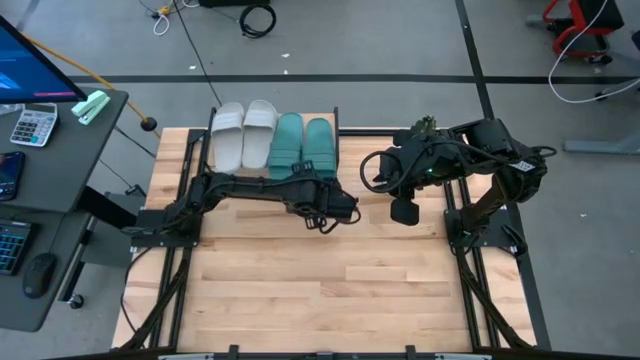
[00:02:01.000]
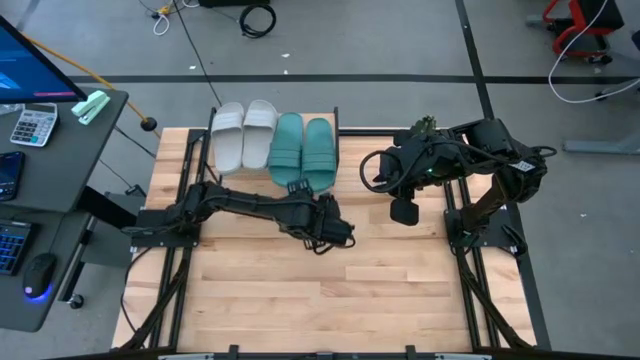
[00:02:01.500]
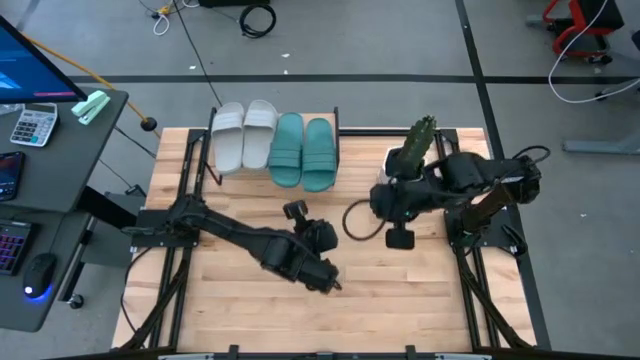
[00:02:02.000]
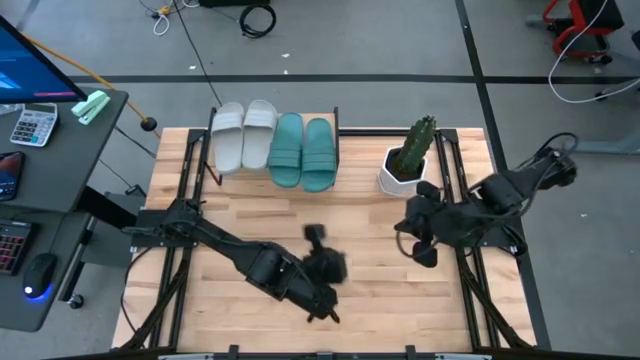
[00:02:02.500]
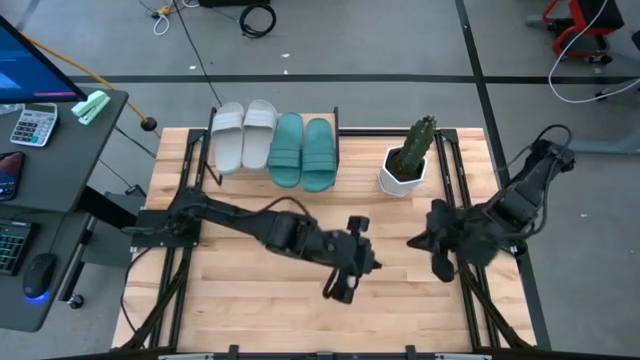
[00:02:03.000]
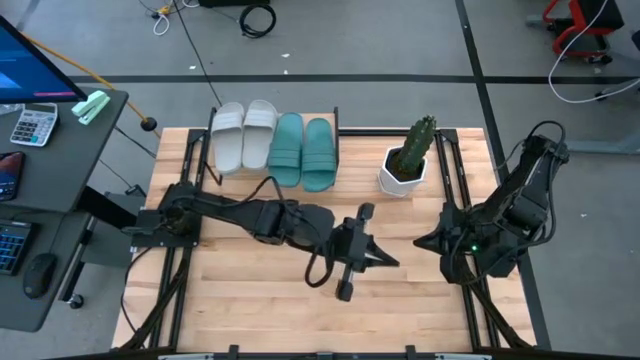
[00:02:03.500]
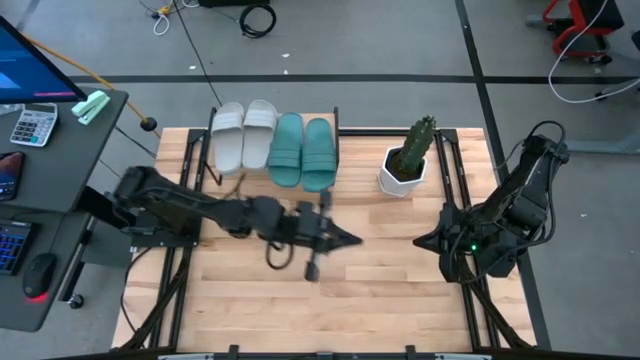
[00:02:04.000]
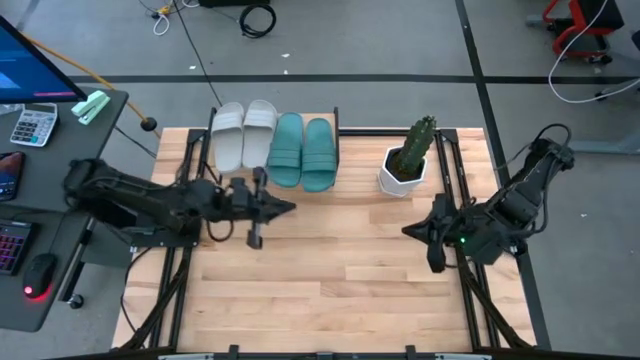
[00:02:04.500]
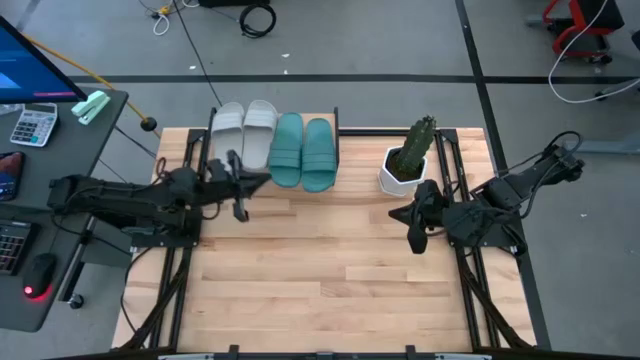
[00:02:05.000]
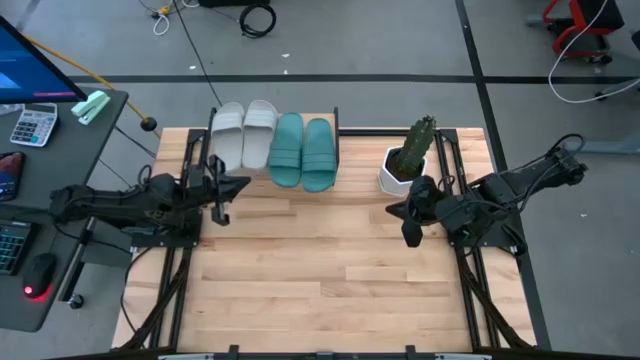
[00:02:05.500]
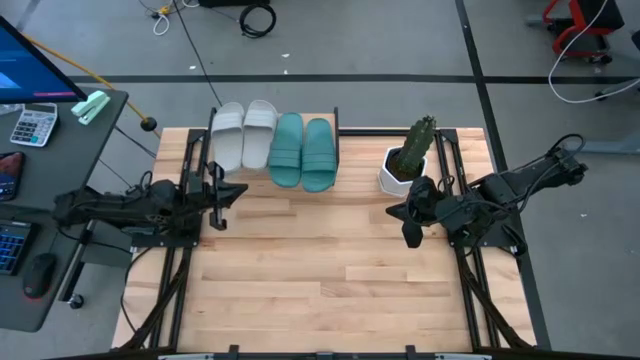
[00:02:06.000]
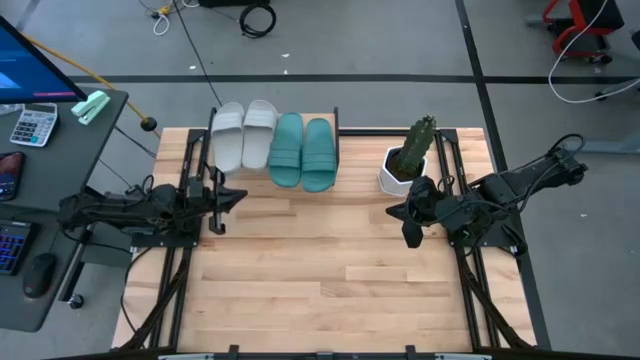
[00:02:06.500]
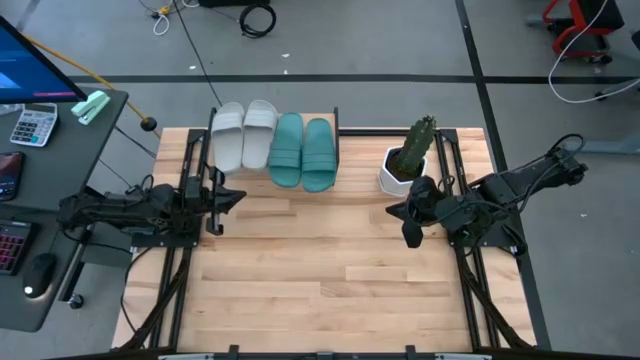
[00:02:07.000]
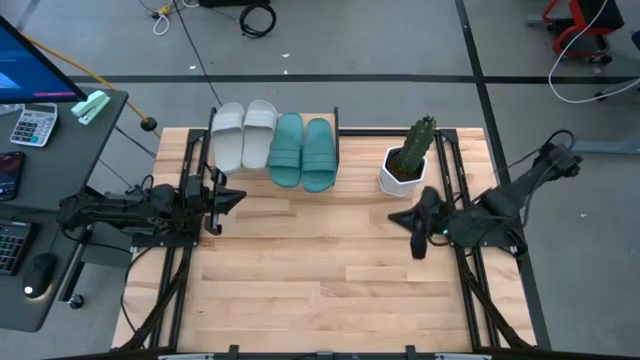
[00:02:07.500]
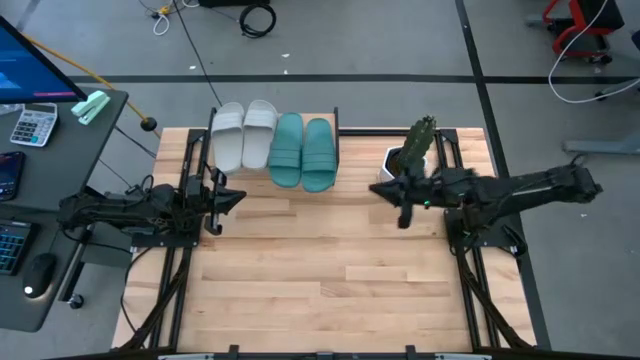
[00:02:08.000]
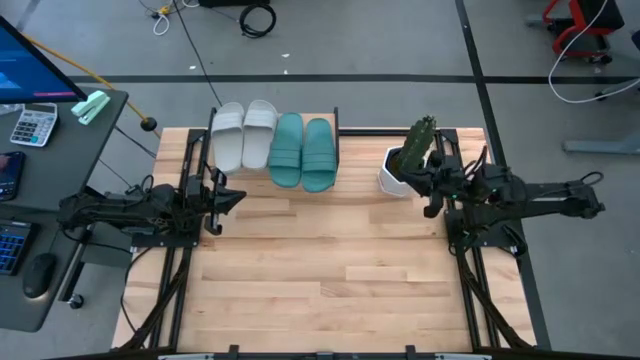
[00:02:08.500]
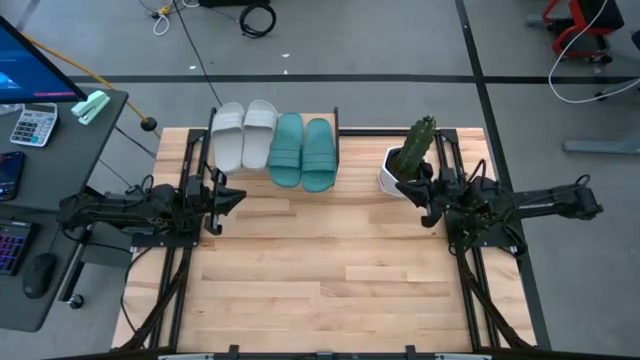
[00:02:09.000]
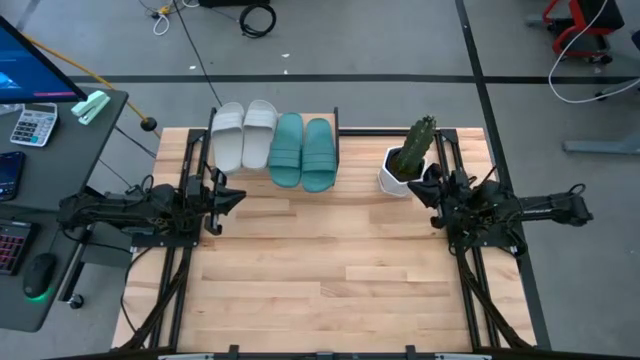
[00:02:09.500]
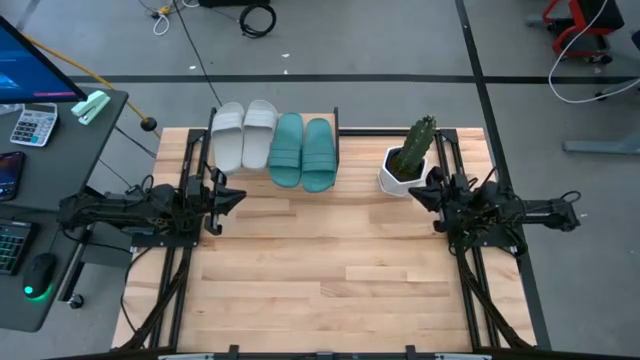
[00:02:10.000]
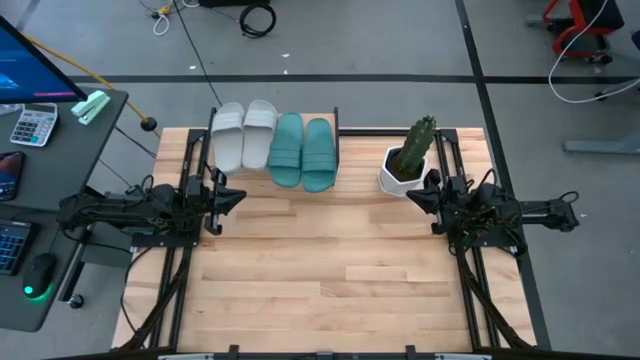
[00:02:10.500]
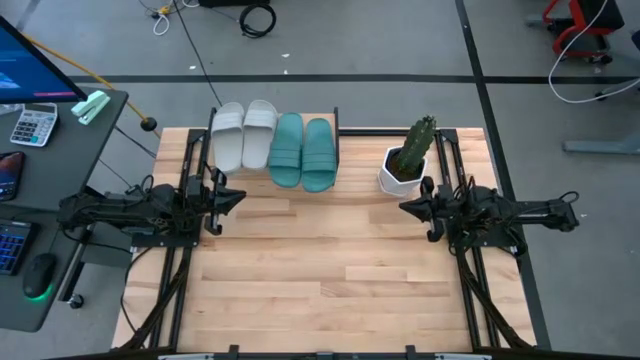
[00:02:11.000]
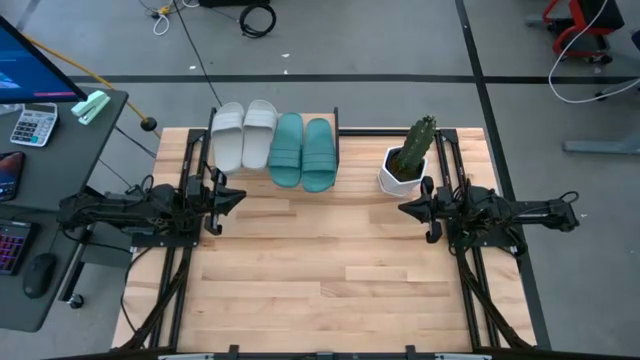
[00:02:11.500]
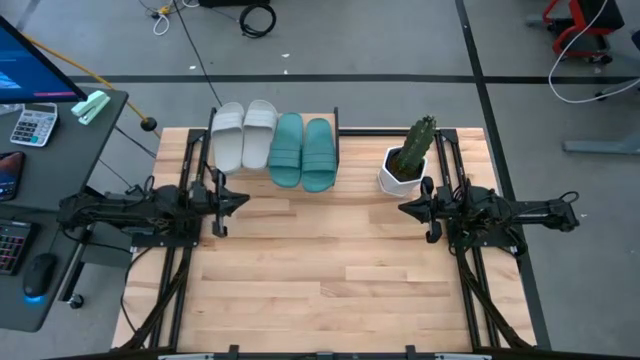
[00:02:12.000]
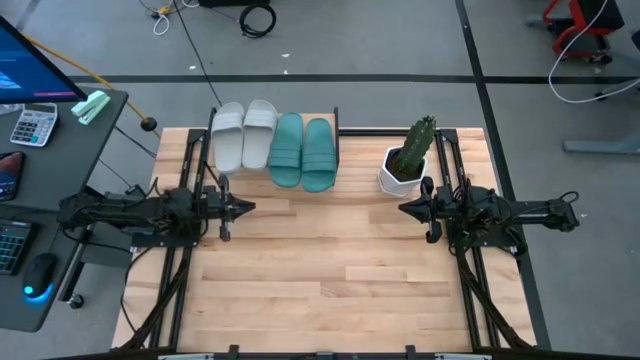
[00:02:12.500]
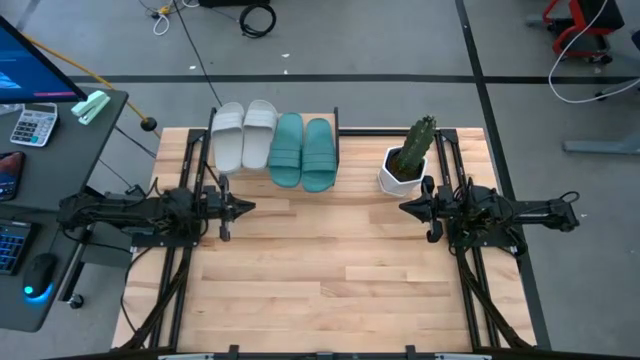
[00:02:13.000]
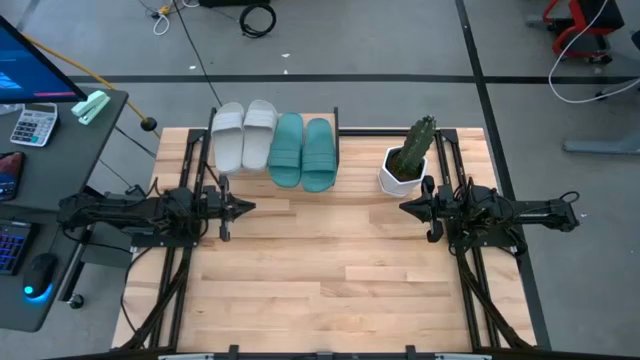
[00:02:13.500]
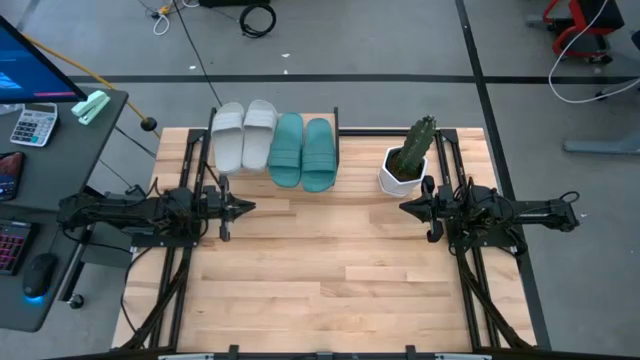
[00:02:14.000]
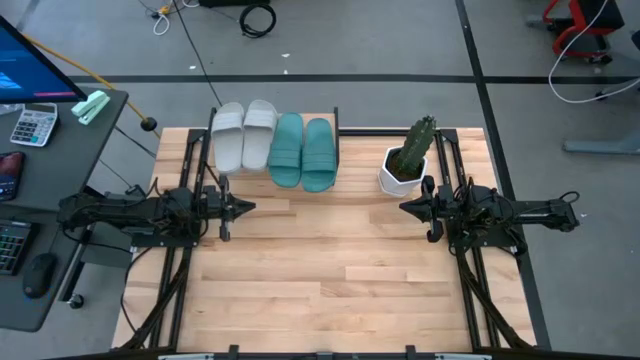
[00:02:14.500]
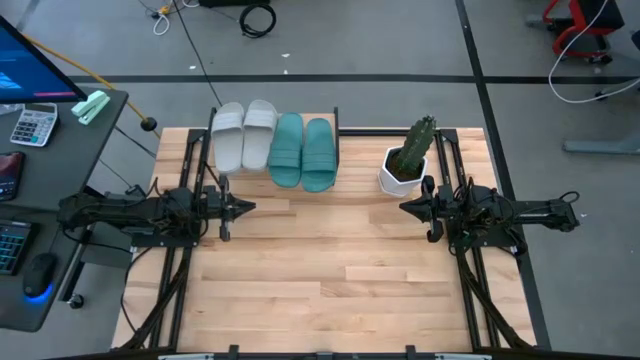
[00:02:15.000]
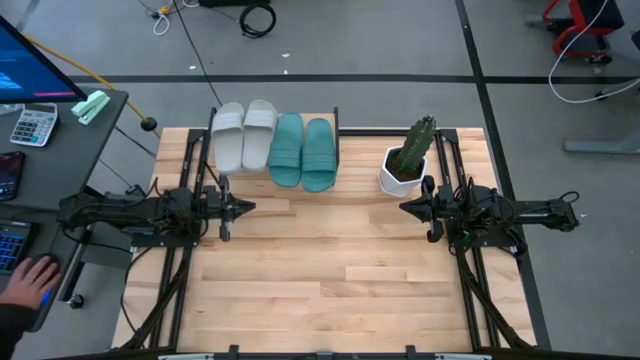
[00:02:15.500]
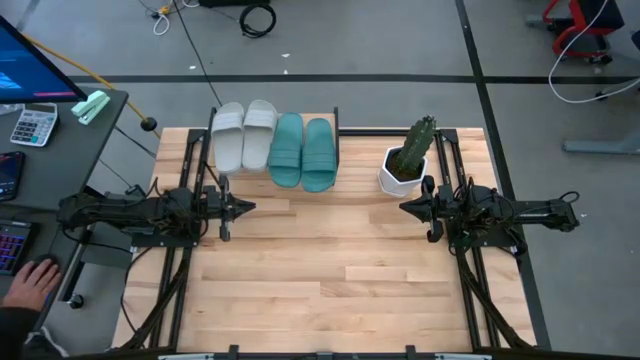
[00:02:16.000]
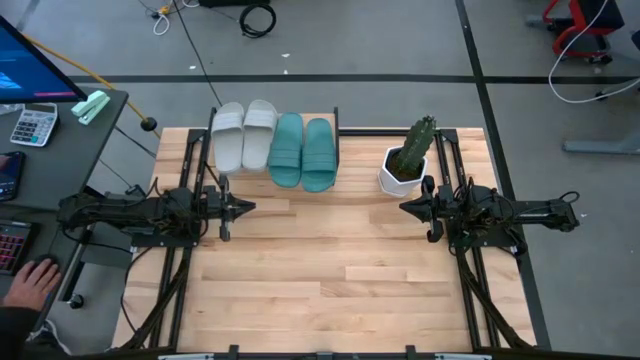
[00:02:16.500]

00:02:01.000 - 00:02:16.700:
Task: Pick and place slides into the shelf
Return to Home Position

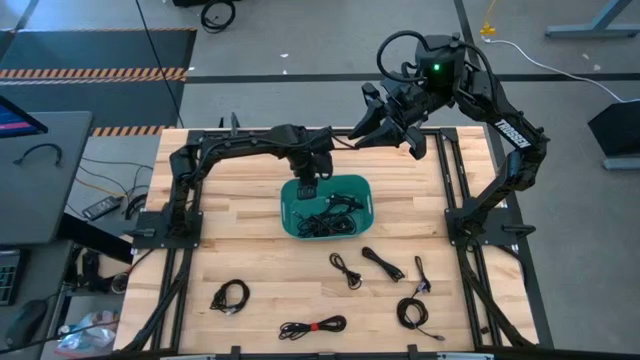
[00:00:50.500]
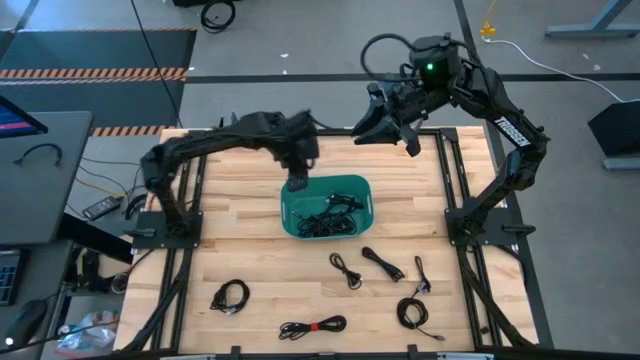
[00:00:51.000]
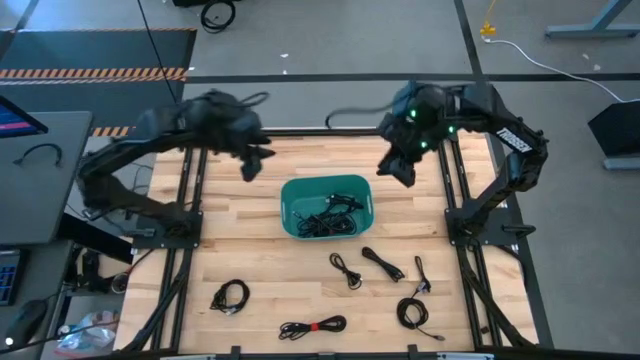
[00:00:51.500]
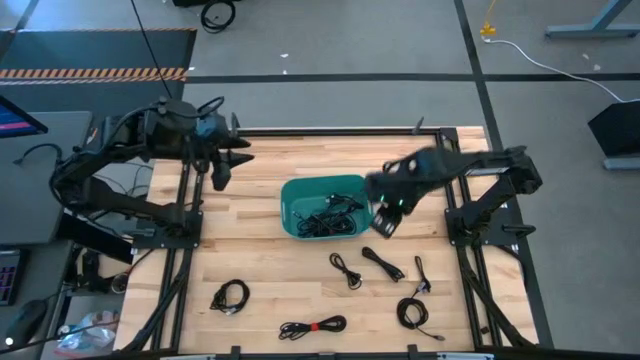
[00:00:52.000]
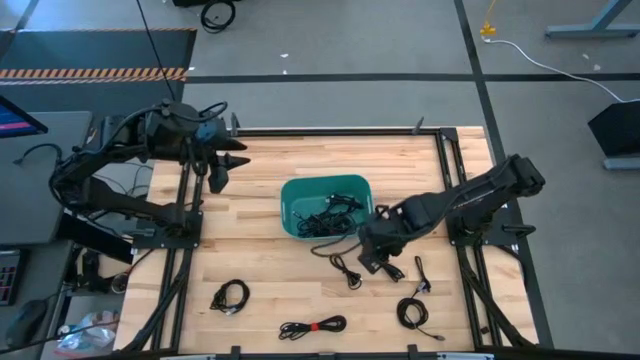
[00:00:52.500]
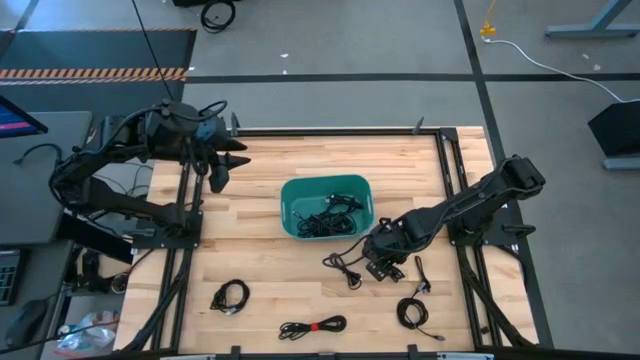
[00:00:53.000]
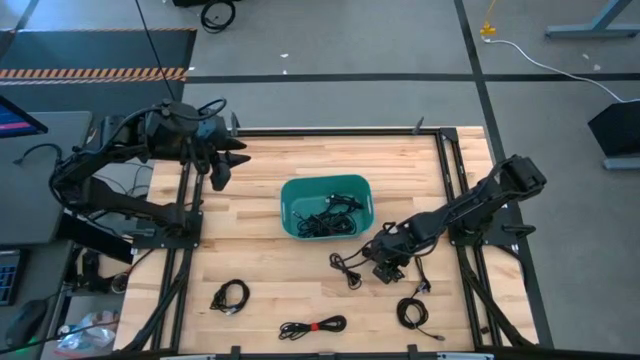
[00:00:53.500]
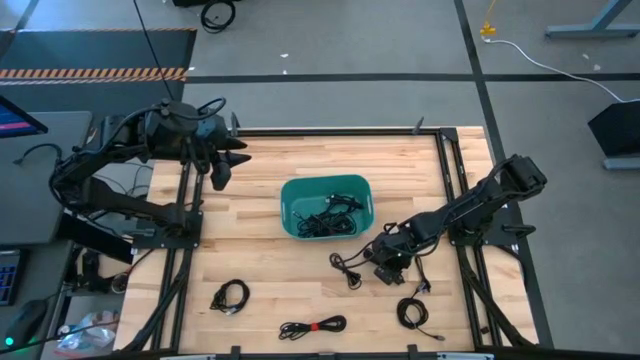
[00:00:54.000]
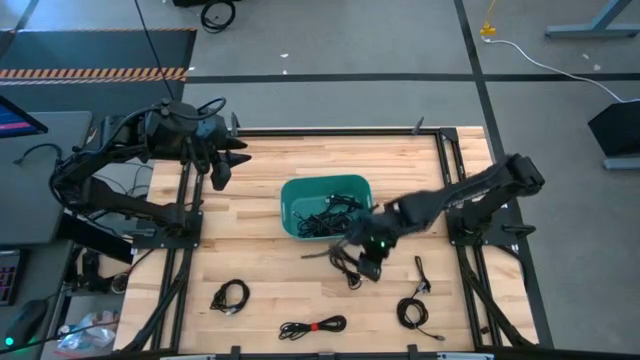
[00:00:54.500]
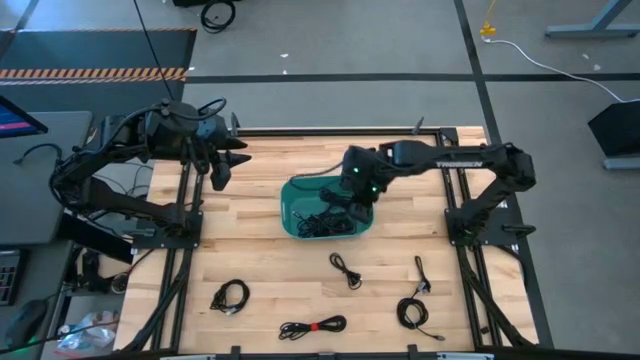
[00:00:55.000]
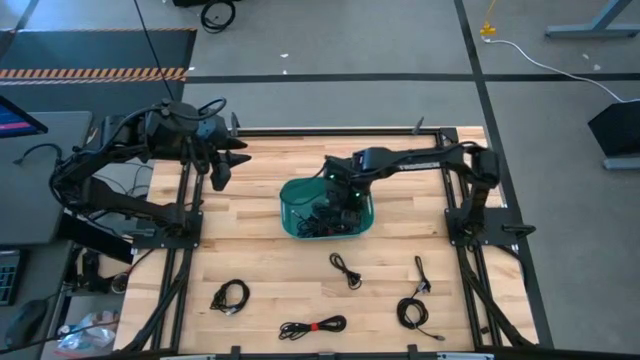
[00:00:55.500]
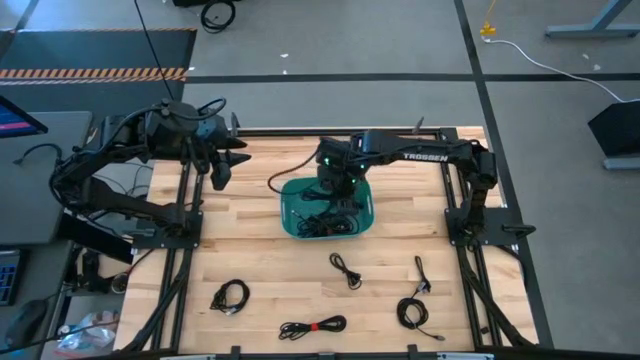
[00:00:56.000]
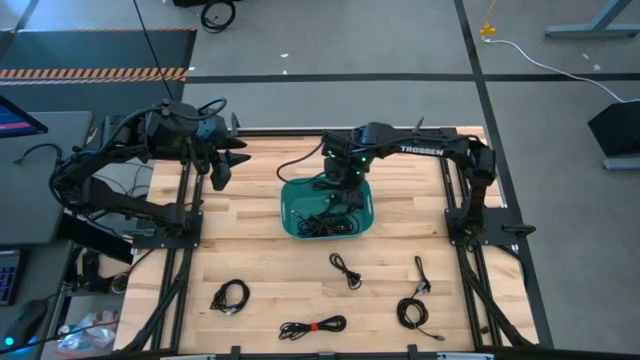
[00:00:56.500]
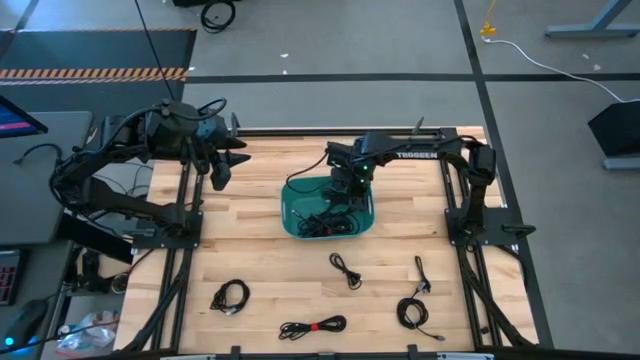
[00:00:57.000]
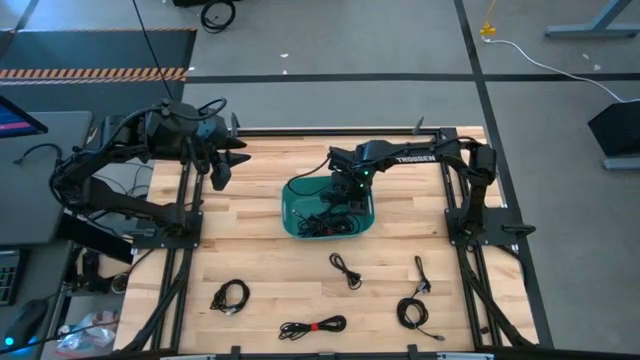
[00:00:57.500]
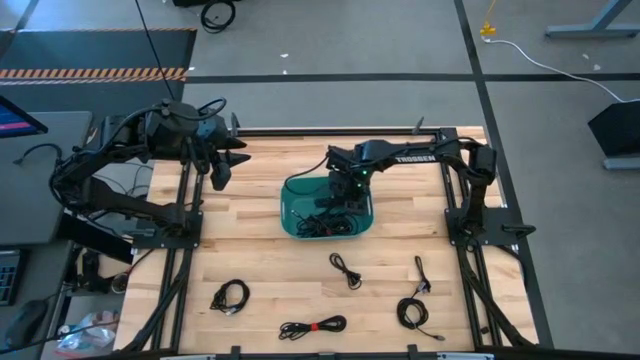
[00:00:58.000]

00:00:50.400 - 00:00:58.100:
Task: Pick and place USB-C Cables
Put the black charger cable into the green bin
